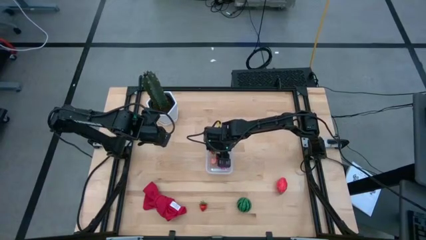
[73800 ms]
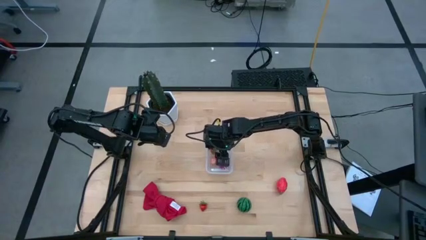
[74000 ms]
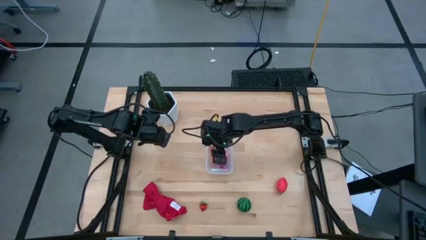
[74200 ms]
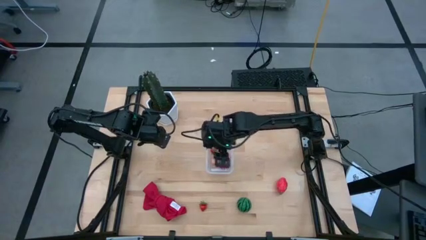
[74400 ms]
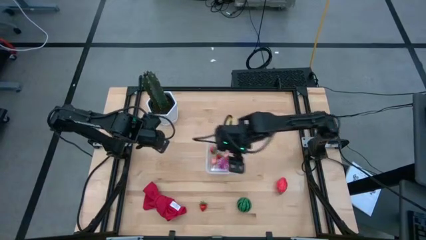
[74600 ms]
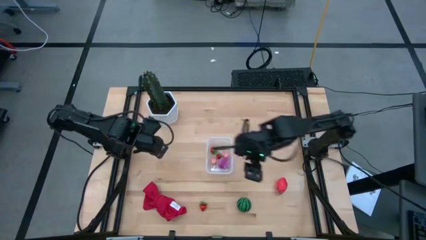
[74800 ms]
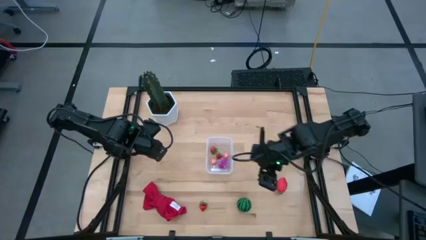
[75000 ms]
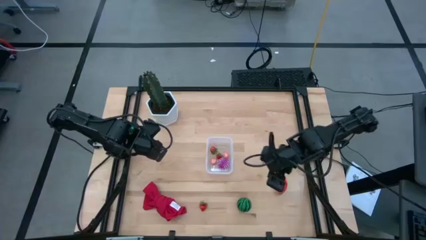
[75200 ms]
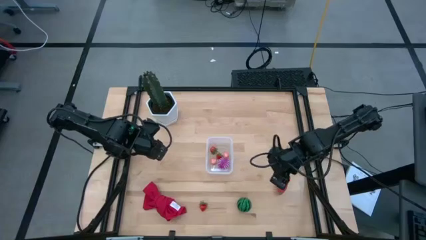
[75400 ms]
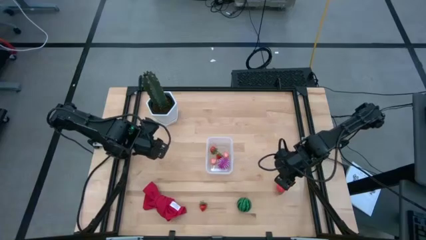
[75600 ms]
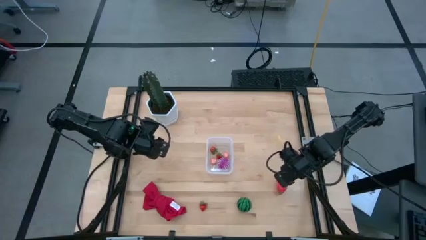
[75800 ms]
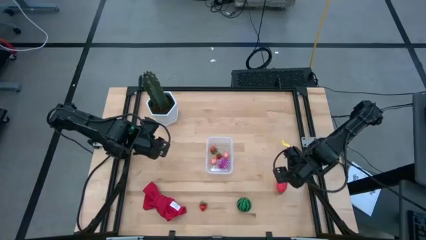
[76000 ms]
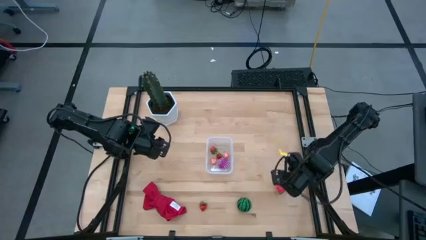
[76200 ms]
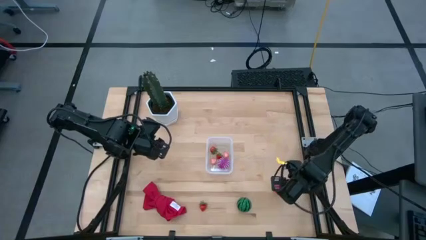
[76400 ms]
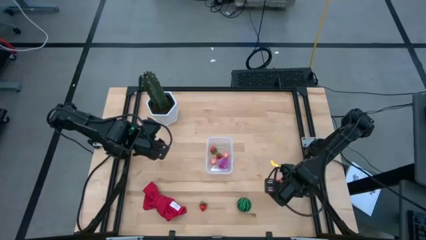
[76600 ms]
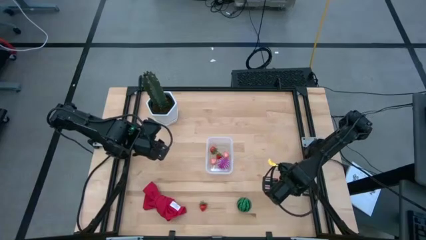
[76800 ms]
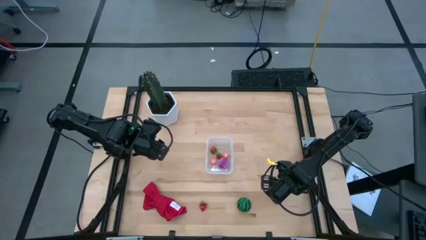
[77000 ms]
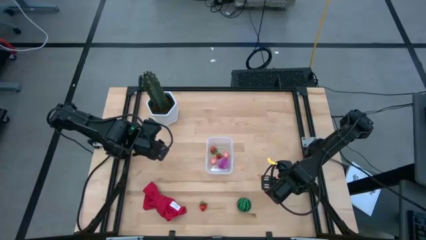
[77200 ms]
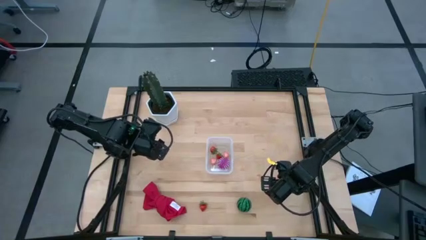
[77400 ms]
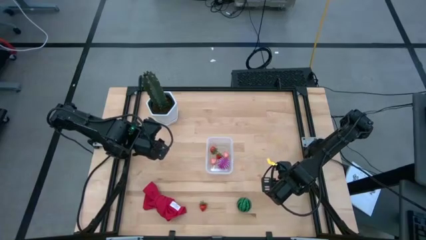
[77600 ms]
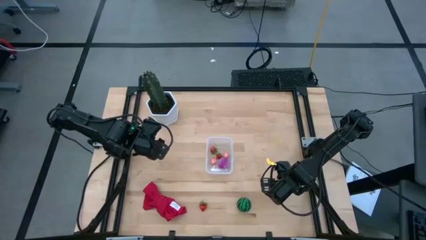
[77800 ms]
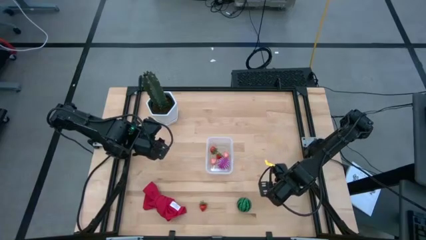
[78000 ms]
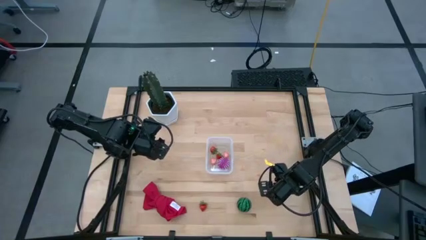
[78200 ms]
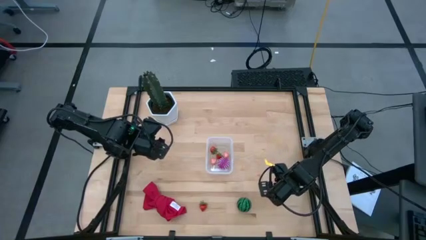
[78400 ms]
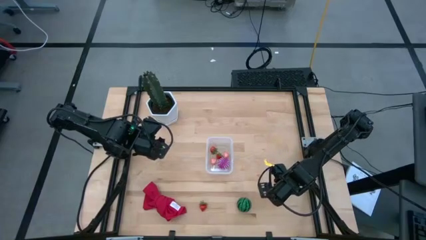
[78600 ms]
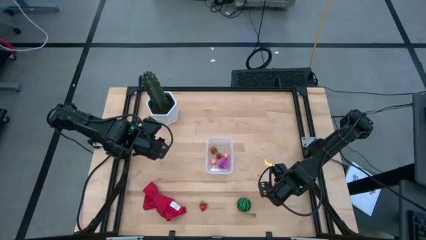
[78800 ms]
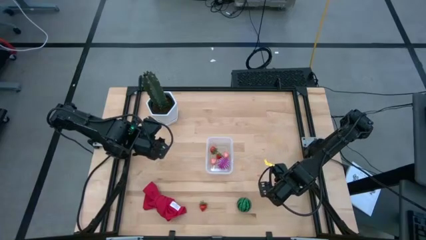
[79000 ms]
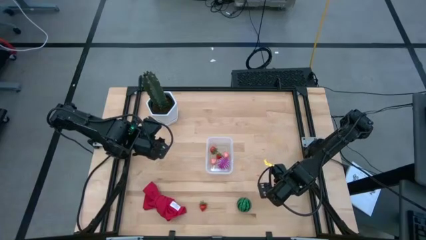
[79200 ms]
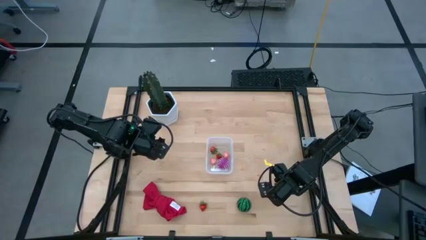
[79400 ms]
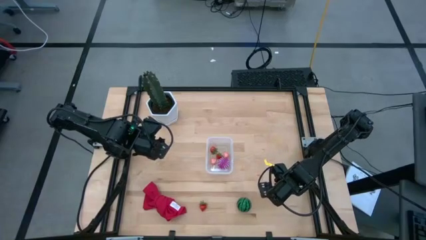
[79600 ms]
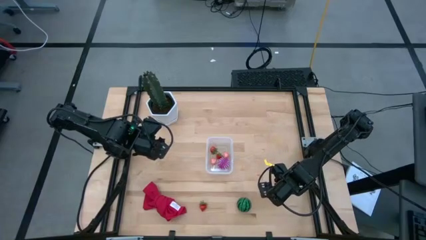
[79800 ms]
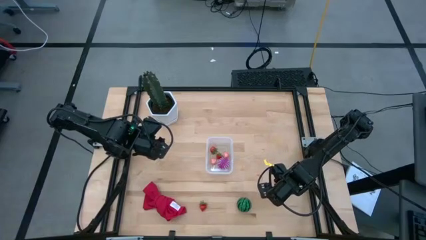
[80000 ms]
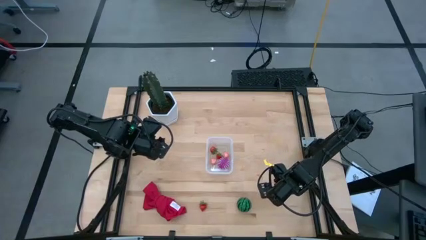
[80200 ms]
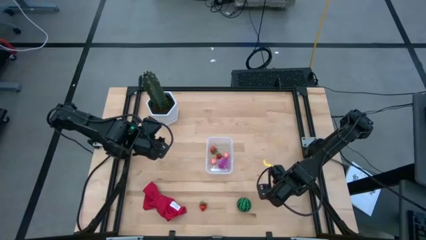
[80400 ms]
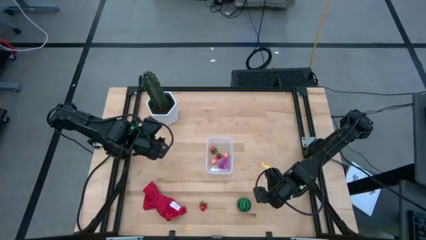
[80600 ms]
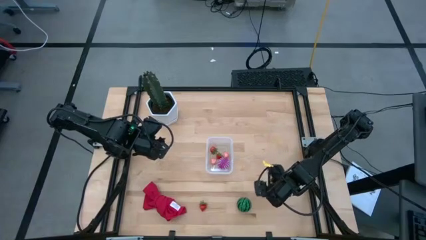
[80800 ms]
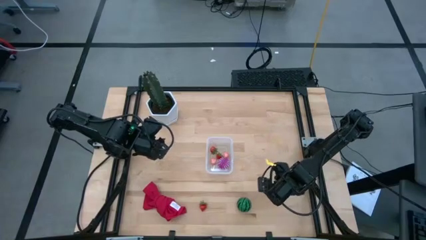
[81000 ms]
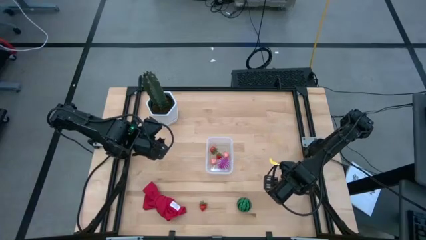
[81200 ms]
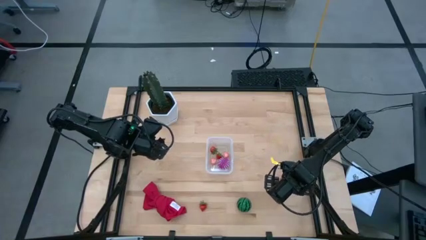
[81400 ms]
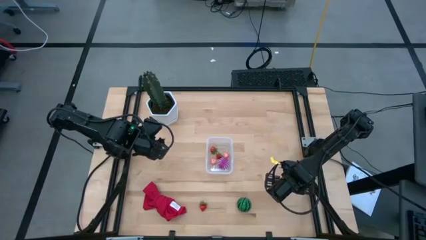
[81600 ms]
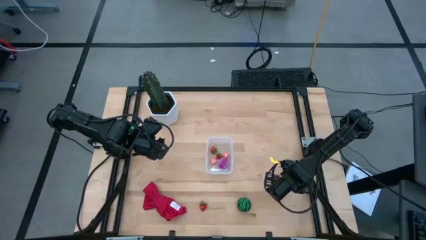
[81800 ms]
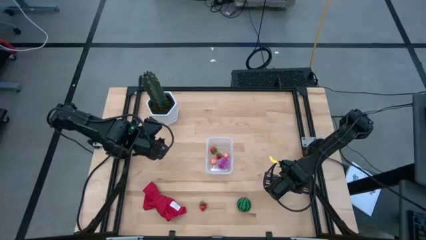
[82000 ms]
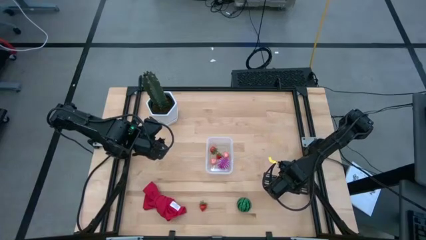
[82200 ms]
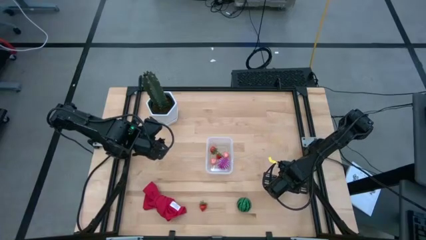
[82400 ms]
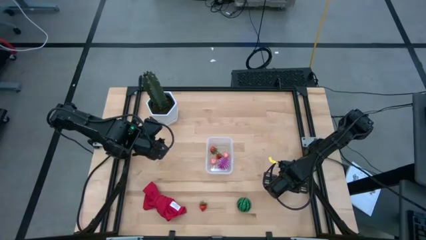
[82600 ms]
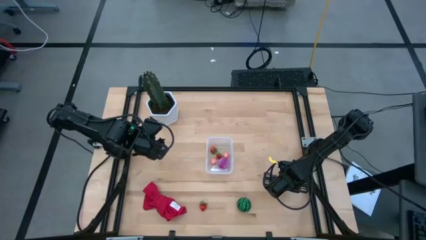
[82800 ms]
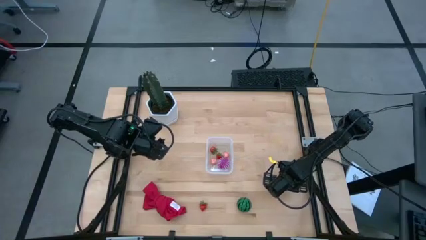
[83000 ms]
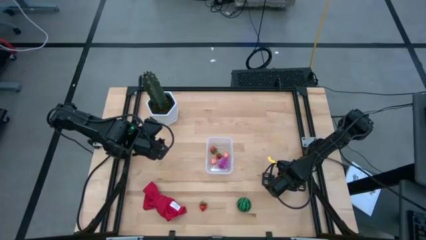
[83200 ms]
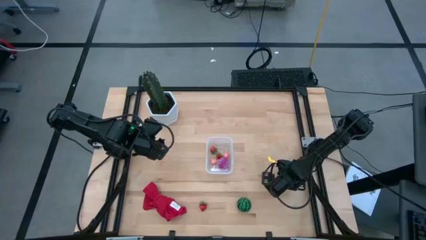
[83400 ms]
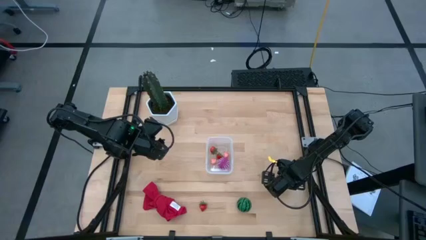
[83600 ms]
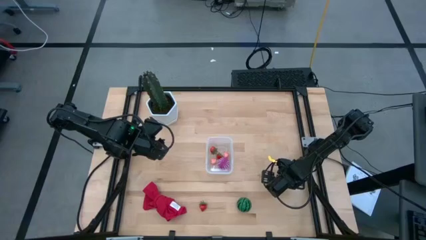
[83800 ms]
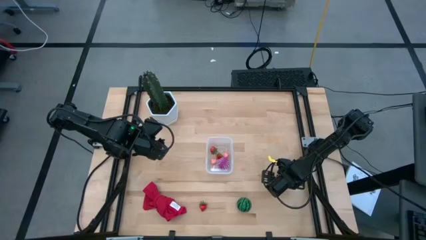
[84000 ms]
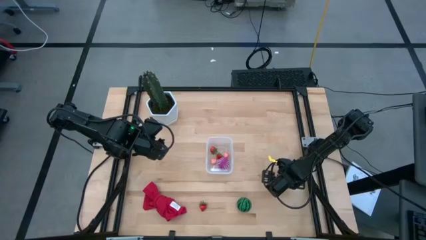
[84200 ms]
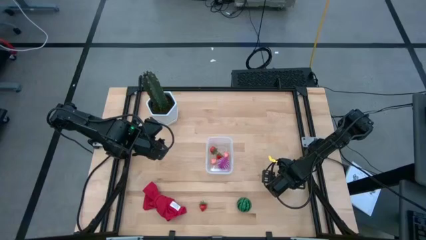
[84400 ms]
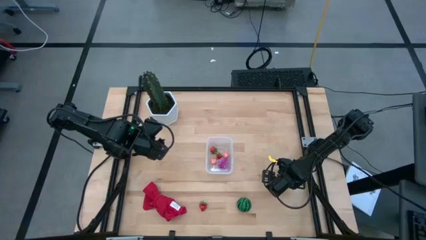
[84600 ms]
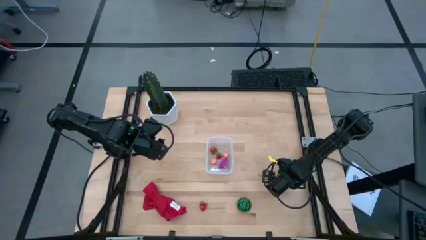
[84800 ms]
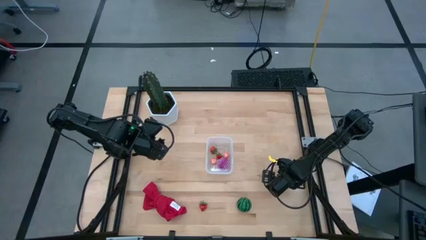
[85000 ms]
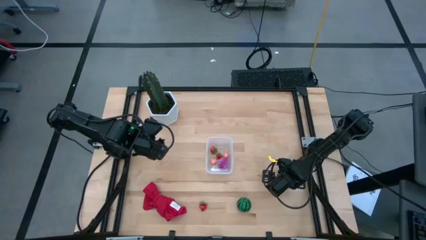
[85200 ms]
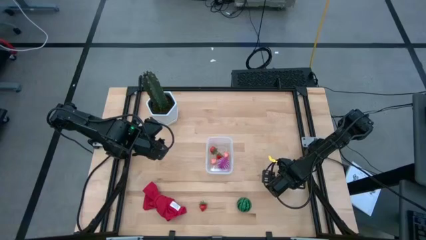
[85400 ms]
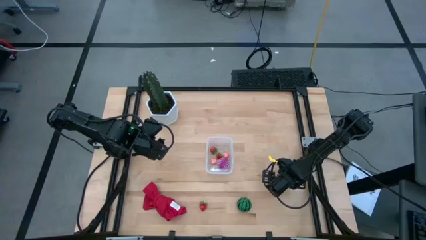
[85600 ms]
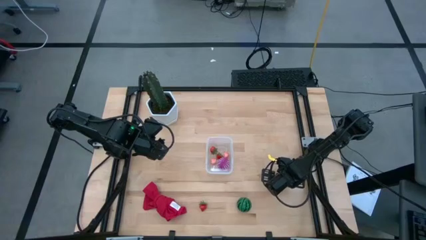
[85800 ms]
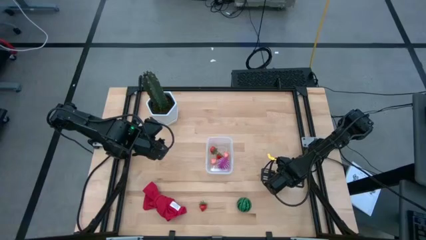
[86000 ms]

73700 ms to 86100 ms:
Task: Pick and placing Produce into tupperware
Put the red dragonfruit into the transparent bin

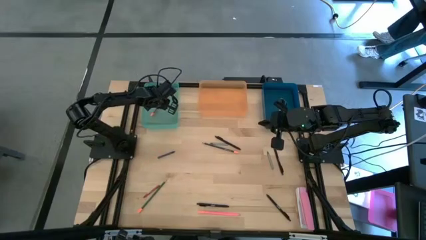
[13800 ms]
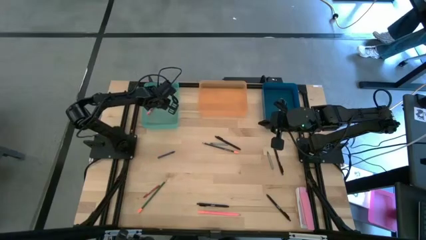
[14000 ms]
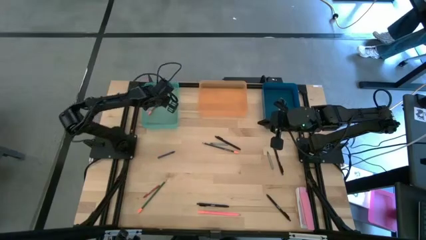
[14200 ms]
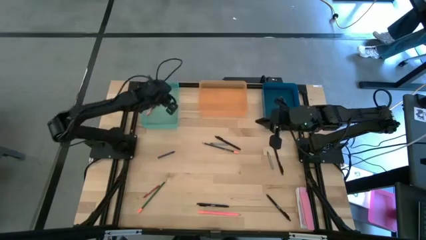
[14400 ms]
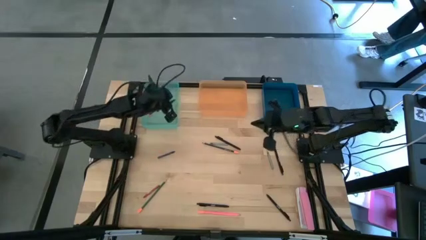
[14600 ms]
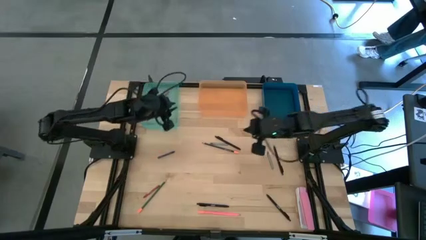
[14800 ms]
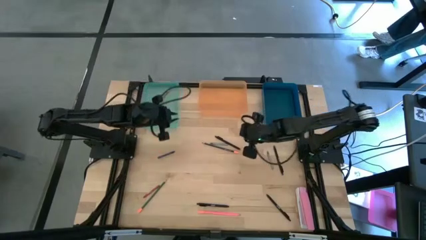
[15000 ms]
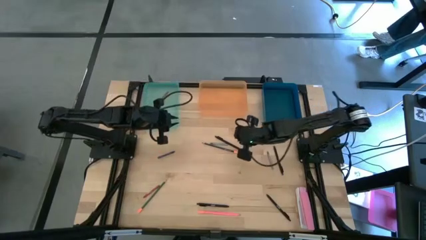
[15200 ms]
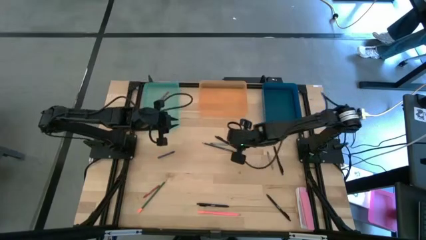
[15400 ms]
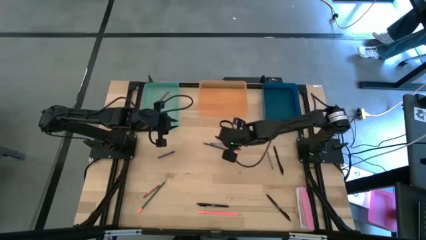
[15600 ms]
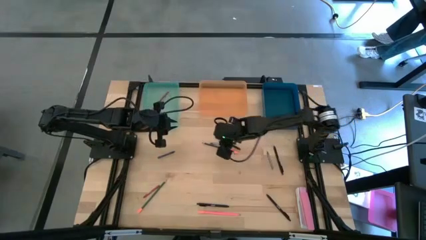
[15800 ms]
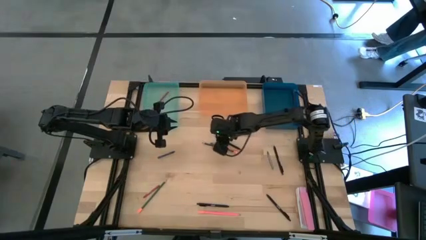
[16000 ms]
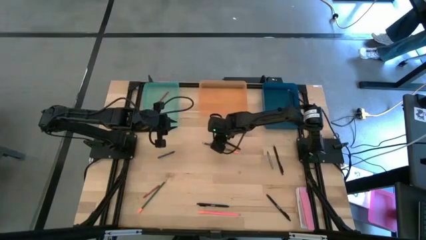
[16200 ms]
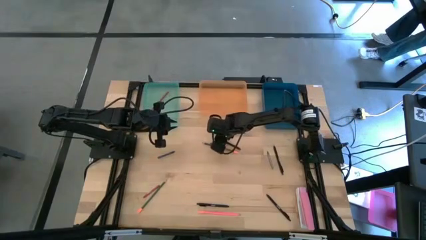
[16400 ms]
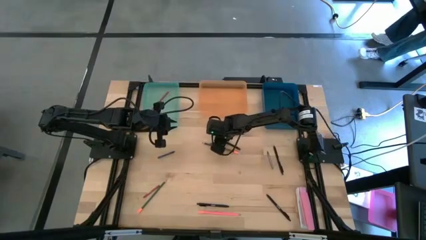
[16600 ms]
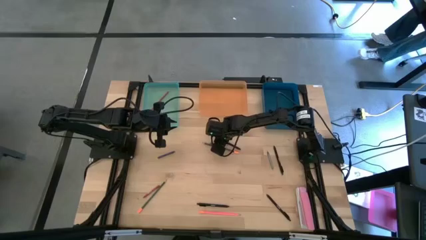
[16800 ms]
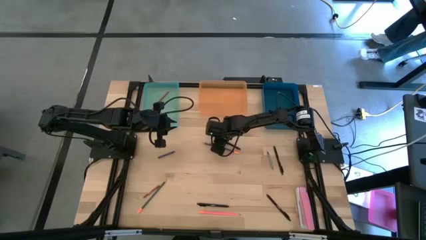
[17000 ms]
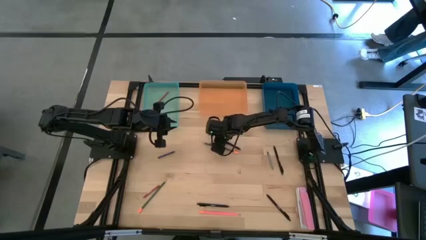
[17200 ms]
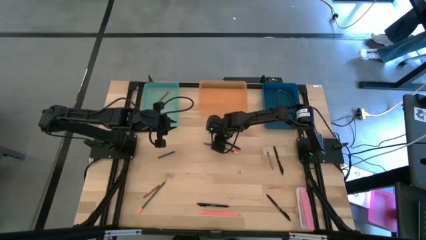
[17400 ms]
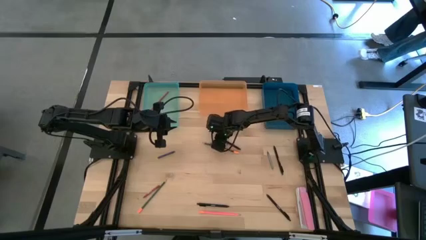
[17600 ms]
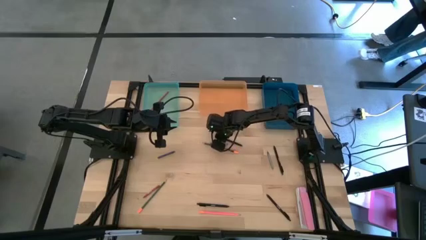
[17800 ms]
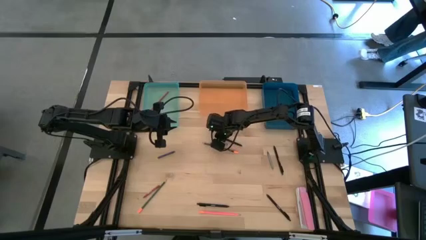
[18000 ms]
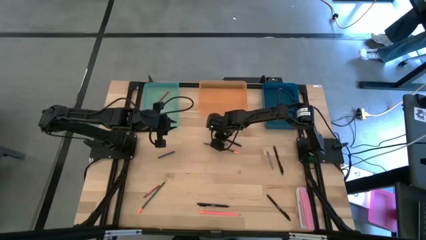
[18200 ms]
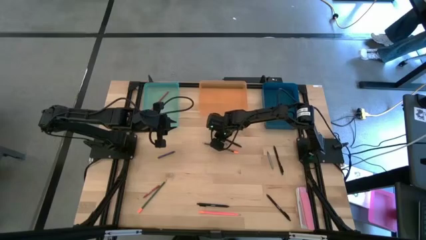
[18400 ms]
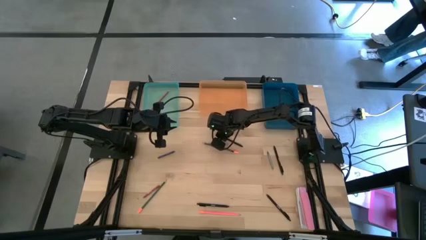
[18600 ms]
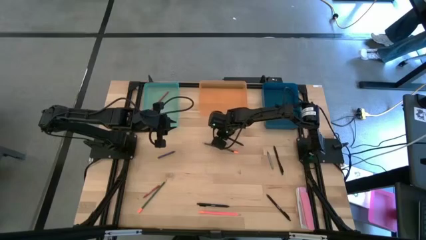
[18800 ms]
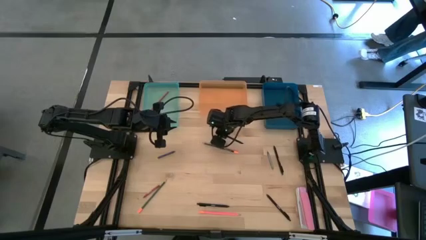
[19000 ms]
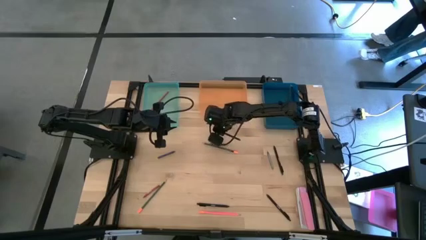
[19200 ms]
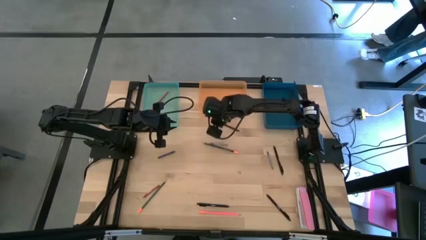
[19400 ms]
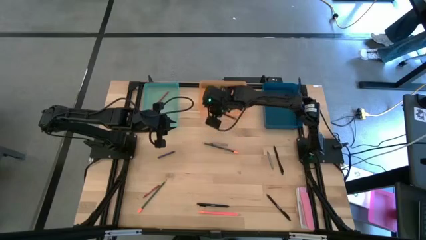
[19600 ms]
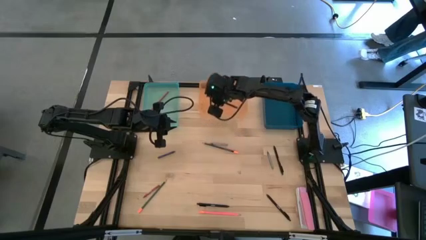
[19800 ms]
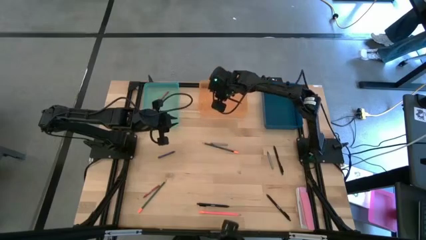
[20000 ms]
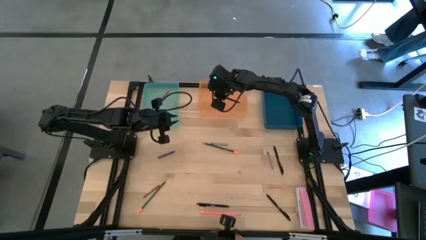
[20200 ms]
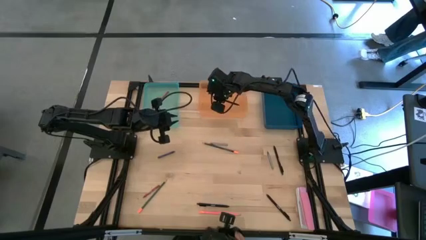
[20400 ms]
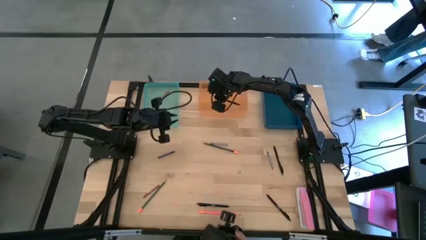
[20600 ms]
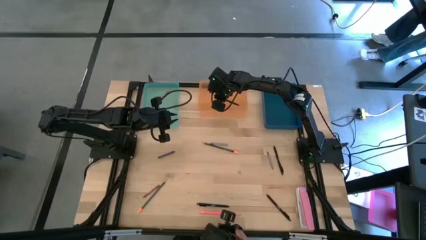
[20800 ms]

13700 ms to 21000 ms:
Task: Sort crayons/erasers/pens/pencils in bins
Put the black pen into the orange bin
